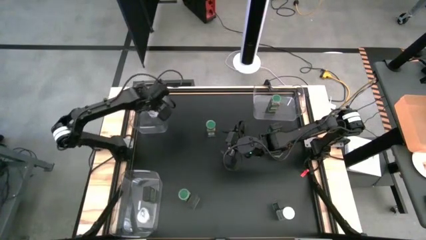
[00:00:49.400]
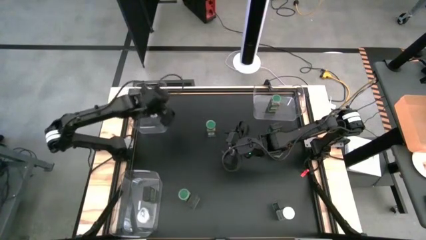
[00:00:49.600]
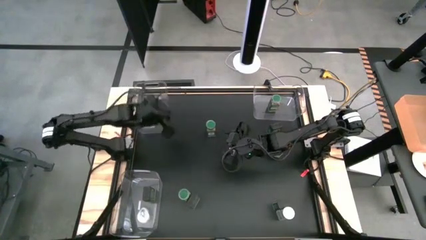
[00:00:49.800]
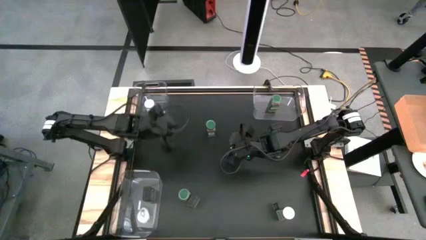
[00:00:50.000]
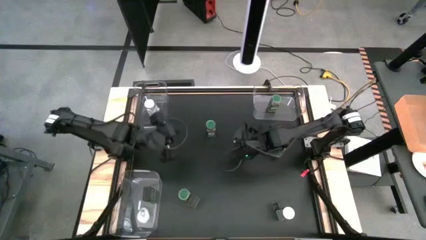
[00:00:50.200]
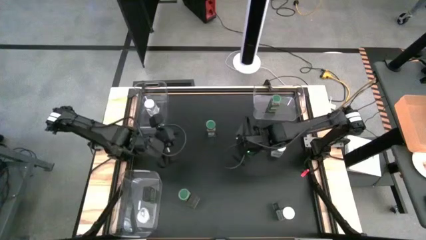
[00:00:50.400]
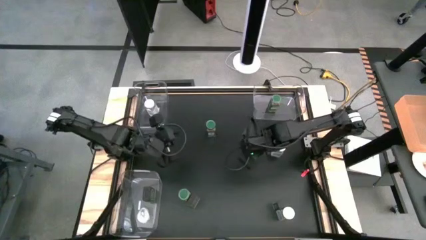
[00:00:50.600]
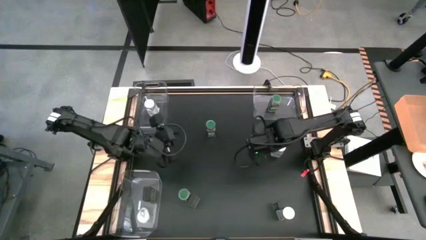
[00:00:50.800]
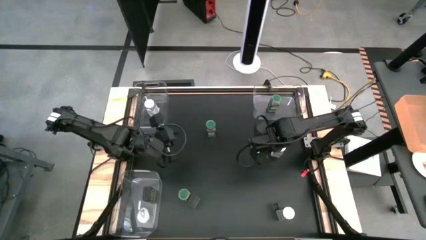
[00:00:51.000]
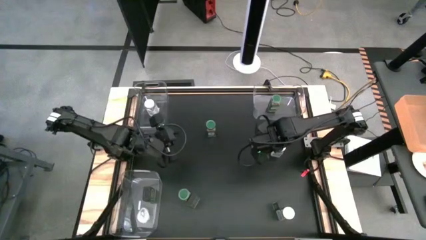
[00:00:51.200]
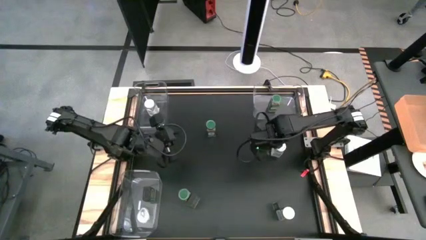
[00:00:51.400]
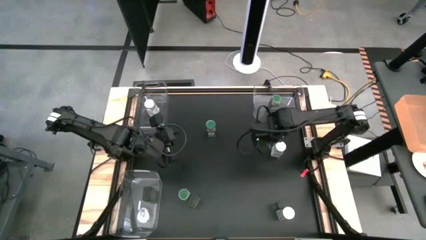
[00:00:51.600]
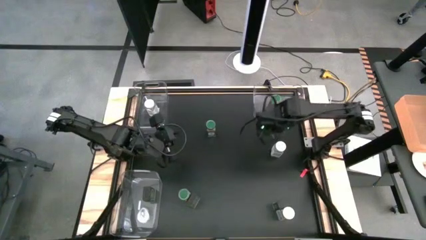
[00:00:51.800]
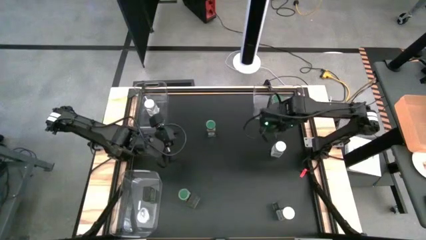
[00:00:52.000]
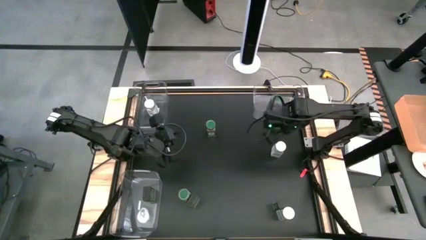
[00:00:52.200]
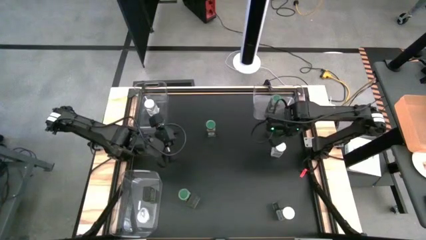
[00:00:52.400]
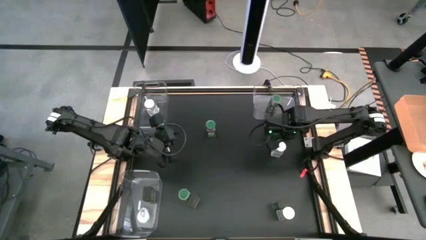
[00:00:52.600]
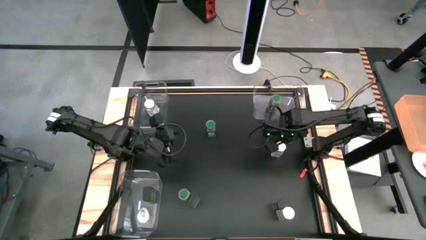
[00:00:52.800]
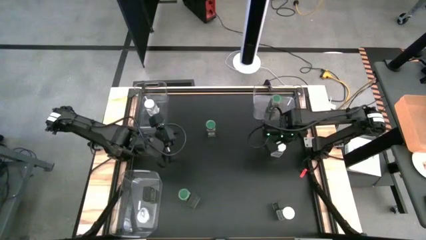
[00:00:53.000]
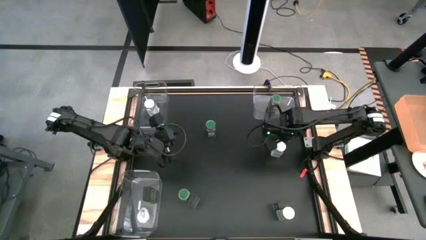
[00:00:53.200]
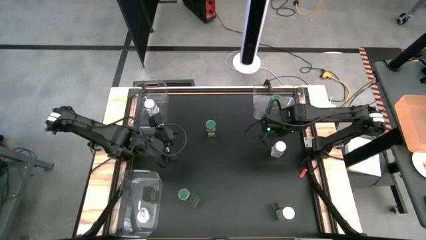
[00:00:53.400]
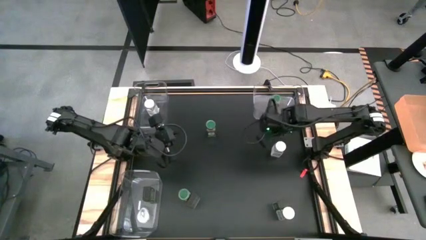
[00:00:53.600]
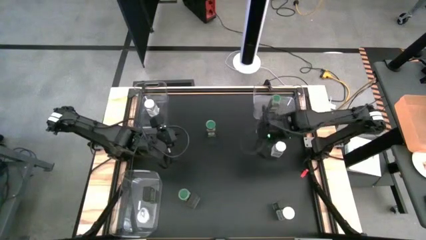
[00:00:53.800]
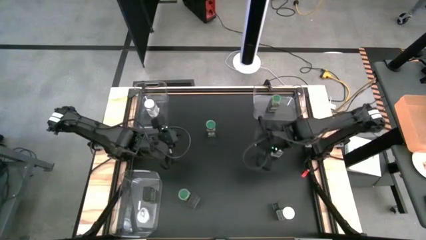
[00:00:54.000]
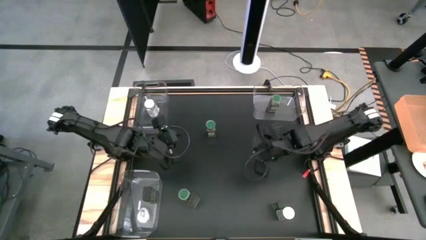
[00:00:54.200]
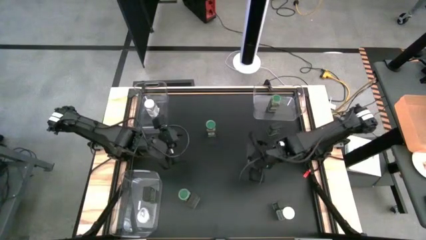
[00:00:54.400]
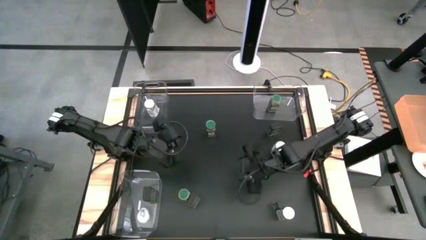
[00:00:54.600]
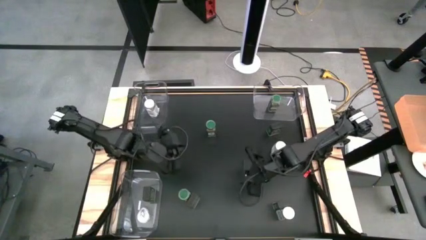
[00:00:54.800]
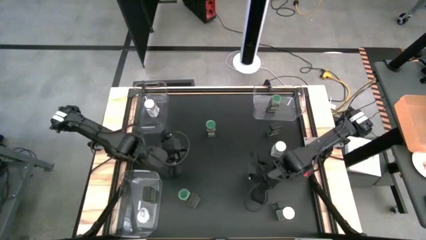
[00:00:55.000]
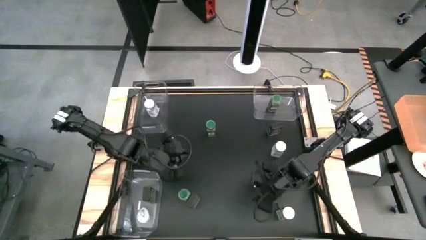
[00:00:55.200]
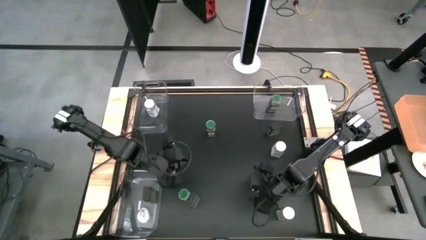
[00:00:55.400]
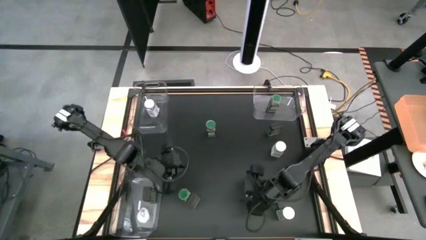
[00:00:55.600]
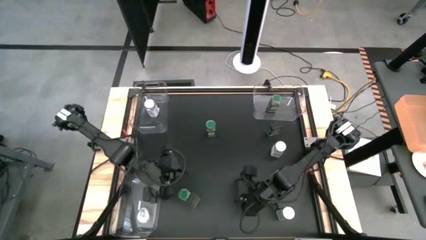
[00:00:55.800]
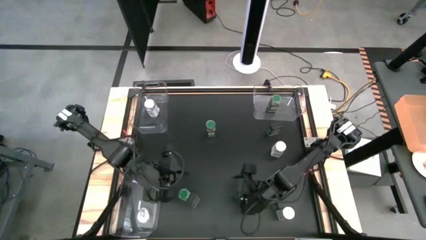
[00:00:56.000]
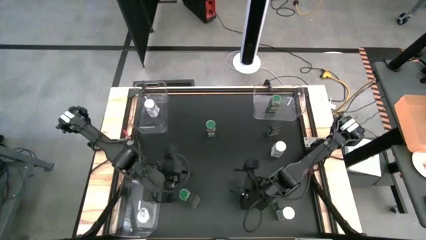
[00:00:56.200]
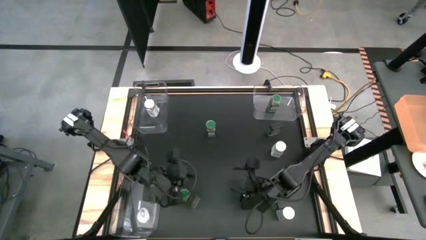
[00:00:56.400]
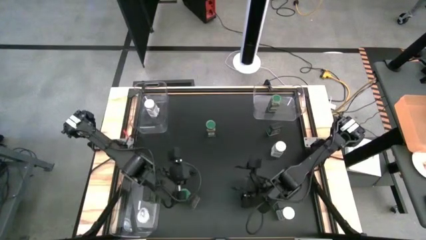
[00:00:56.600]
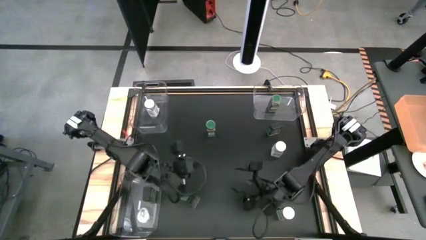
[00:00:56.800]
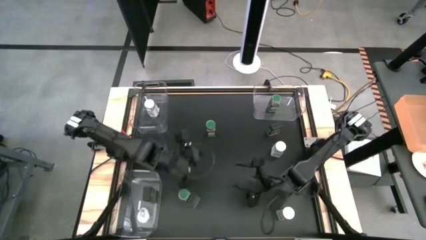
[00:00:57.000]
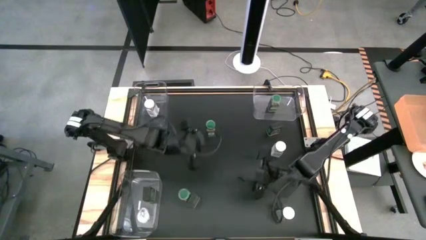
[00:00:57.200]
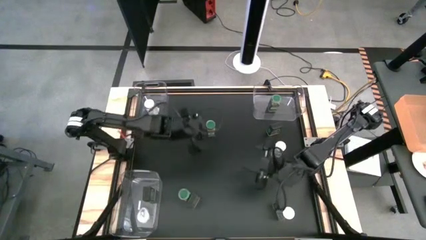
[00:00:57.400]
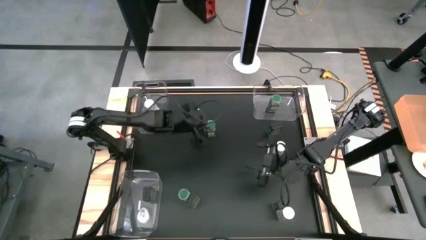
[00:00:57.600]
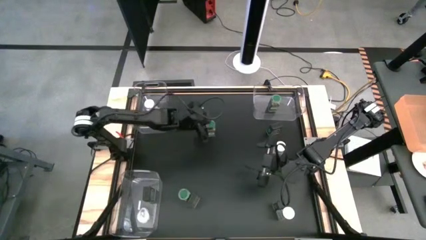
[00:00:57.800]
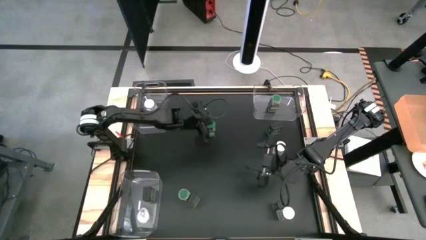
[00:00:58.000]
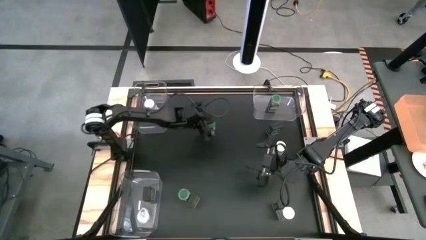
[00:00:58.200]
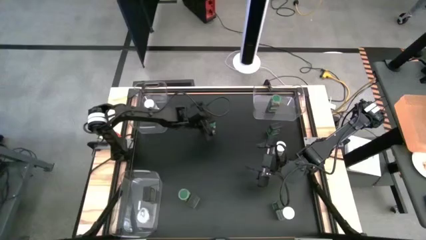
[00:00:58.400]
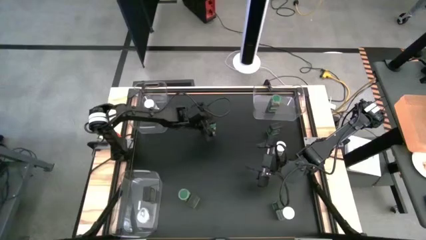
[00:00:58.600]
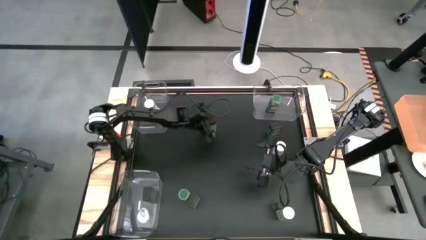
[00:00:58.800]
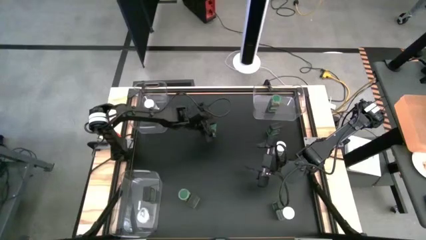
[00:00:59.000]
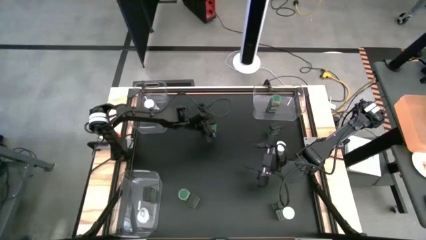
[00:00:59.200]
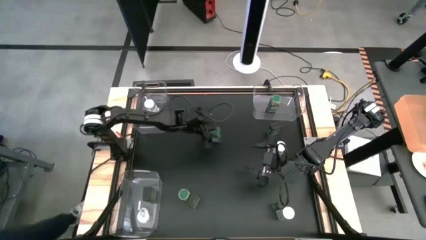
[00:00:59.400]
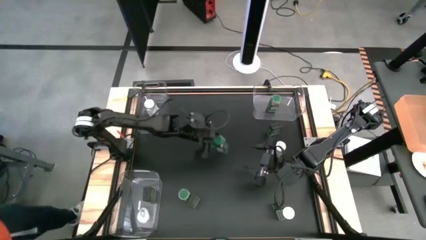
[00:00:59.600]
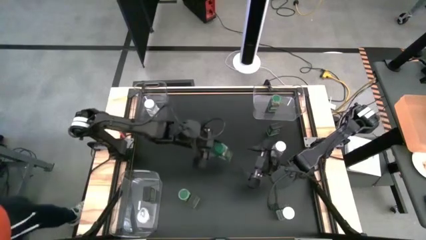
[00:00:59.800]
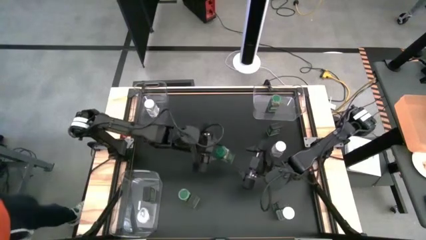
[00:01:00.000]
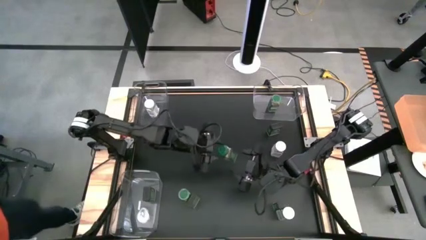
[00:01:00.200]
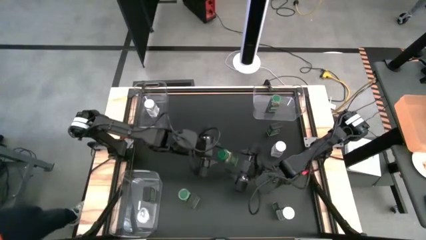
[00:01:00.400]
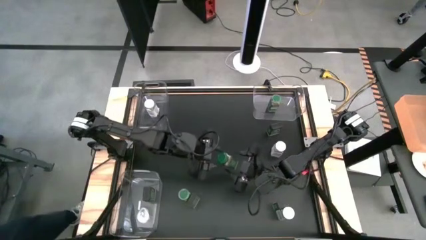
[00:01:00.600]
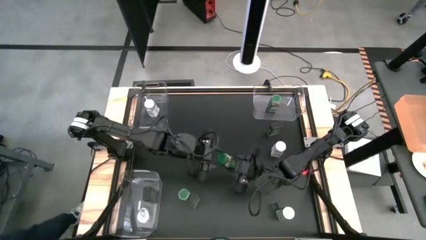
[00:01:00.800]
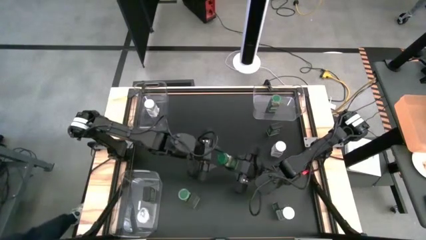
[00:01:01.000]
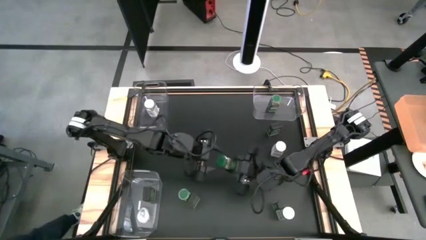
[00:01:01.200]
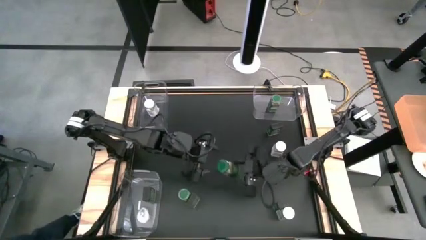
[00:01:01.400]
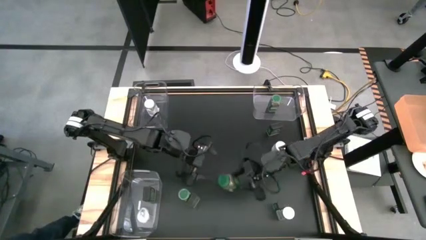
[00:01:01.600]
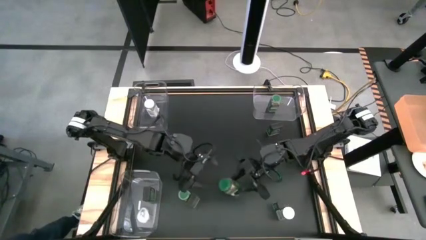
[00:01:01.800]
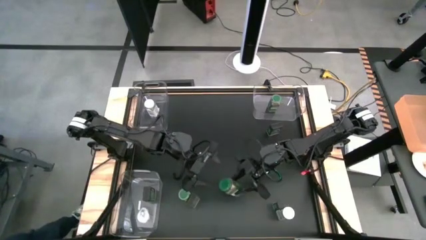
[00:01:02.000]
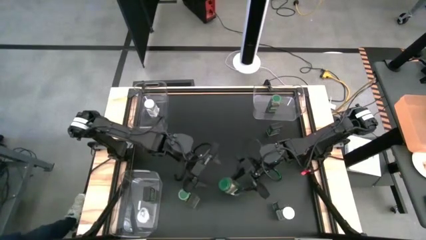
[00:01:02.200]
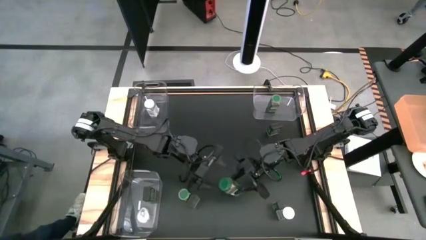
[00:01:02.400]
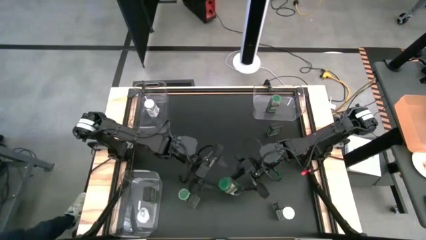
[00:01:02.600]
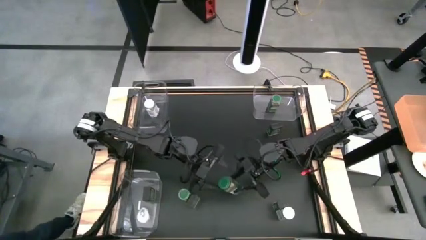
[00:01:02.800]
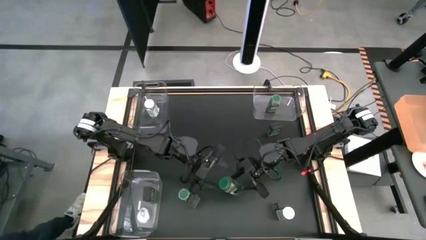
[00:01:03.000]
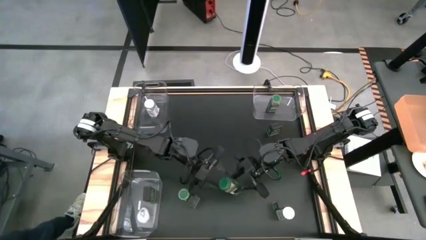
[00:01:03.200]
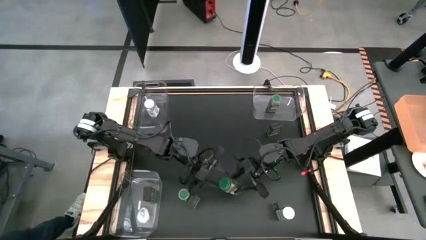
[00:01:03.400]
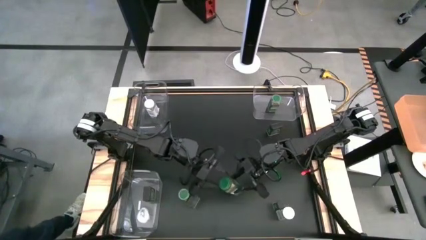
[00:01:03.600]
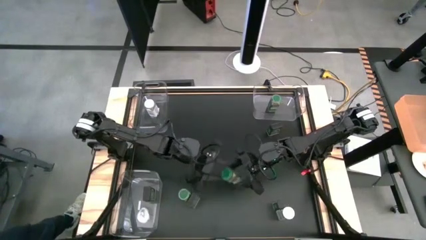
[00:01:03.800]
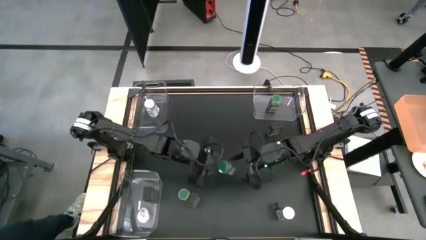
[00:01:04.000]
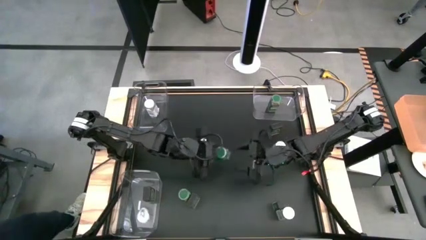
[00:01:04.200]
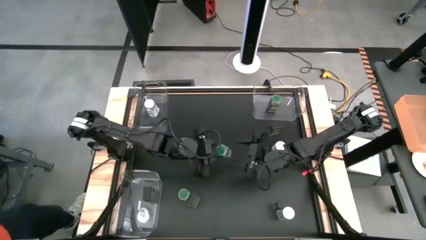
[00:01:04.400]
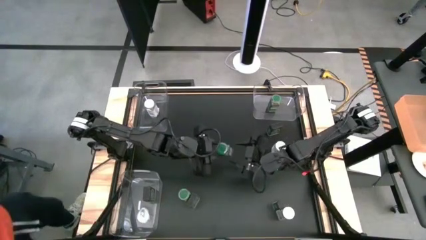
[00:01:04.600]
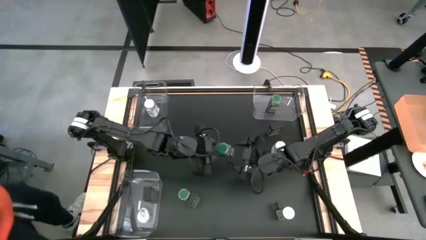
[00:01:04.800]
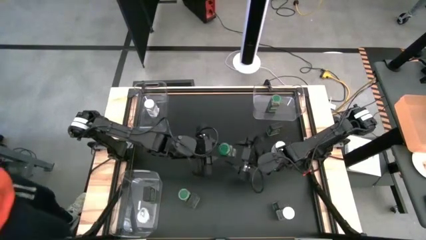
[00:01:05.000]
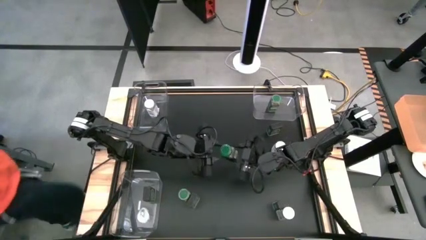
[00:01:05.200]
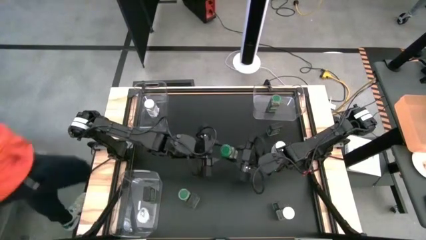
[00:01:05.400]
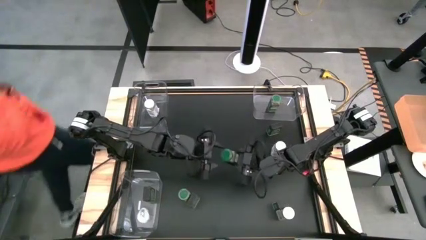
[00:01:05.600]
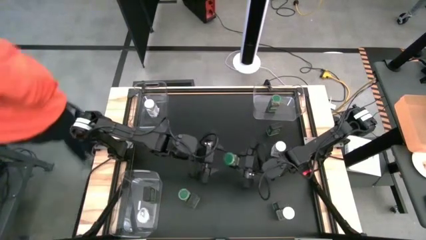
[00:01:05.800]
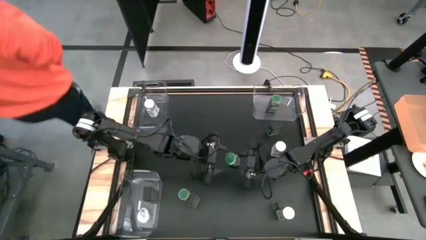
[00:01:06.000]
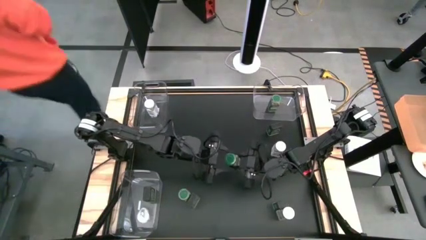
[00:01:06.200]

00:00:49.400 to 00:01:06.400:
Task: Sort spices by type
Put the top green seasoning bottle into the top right transparent bin
